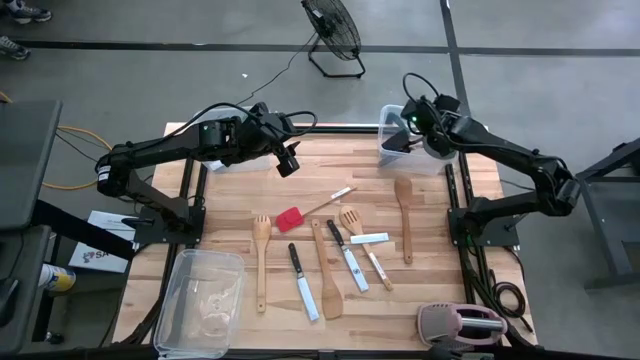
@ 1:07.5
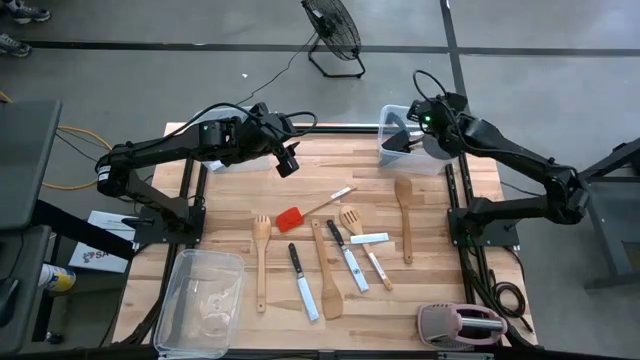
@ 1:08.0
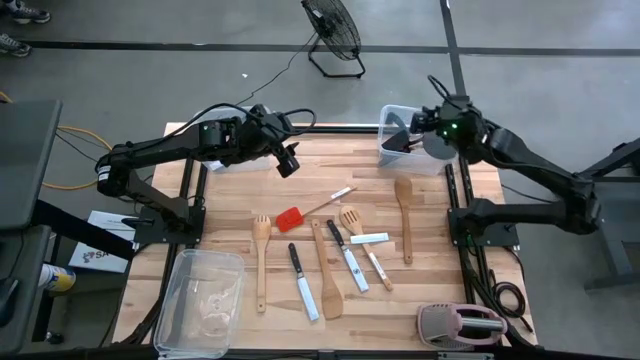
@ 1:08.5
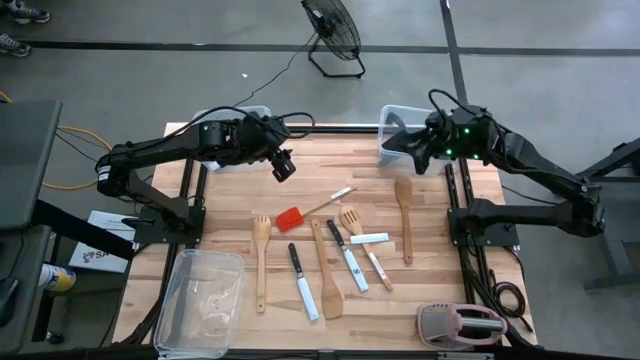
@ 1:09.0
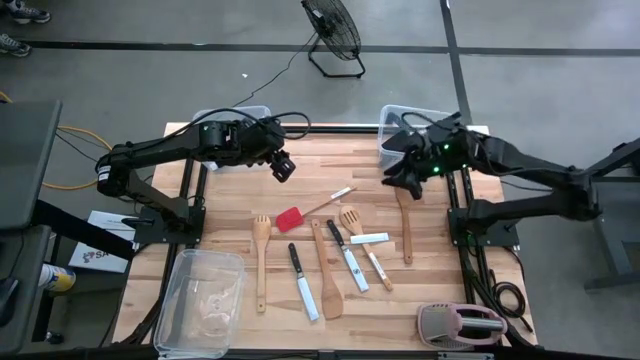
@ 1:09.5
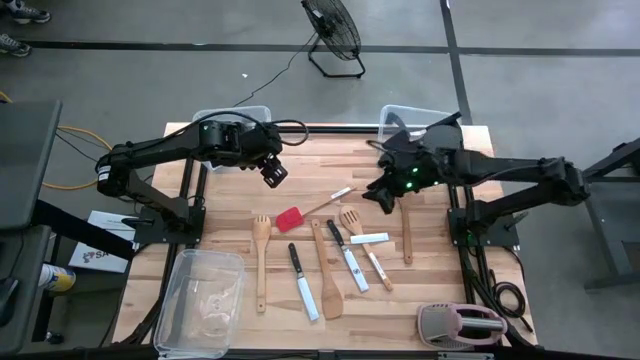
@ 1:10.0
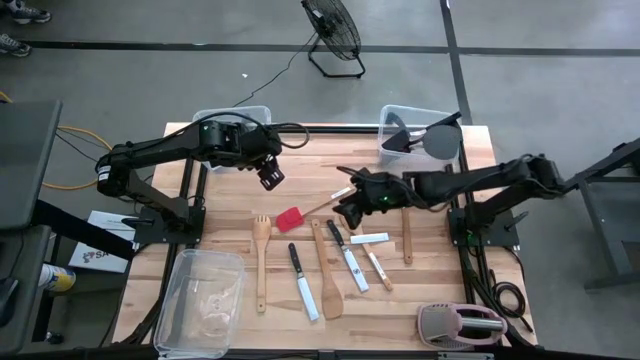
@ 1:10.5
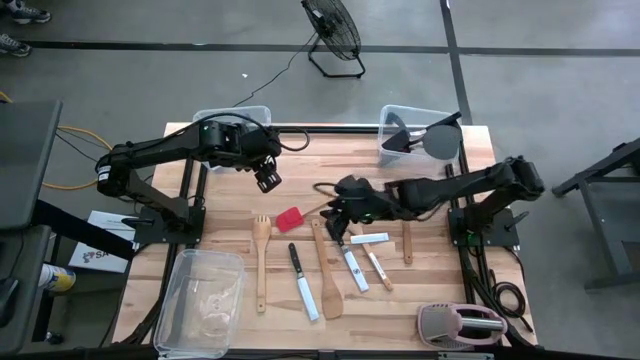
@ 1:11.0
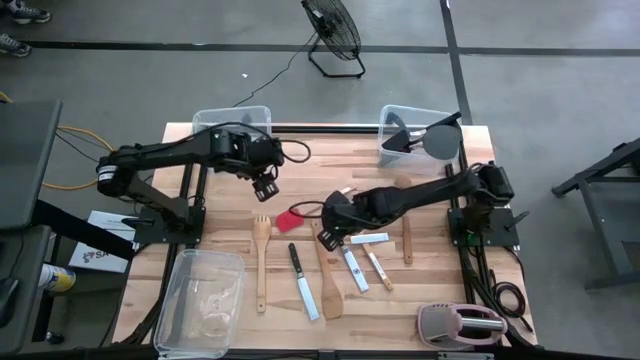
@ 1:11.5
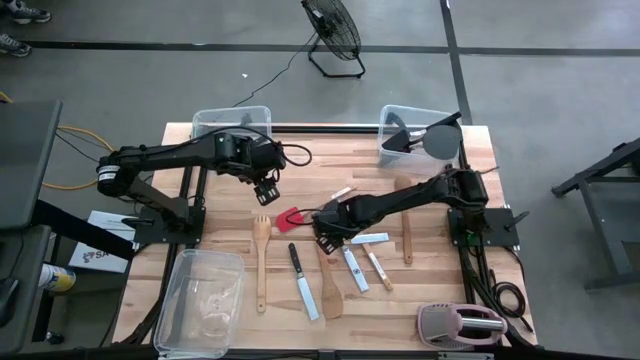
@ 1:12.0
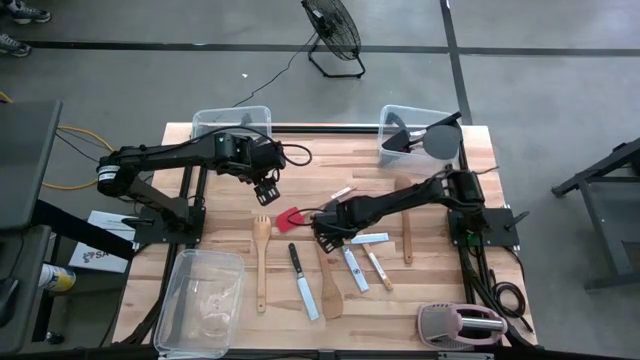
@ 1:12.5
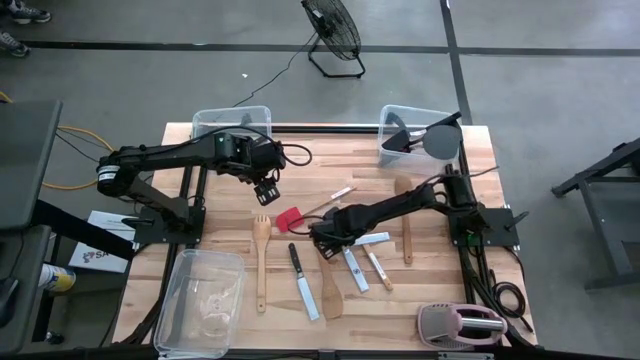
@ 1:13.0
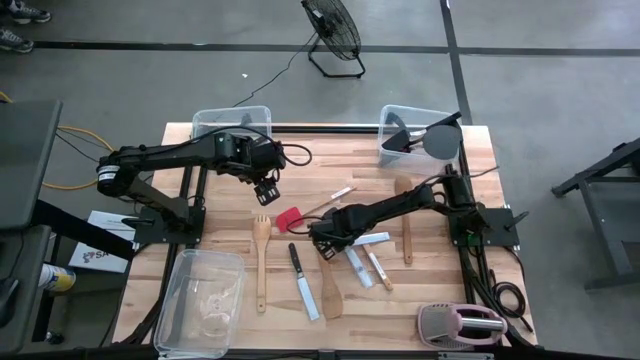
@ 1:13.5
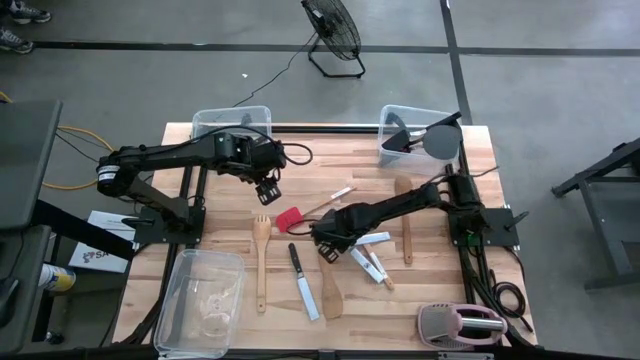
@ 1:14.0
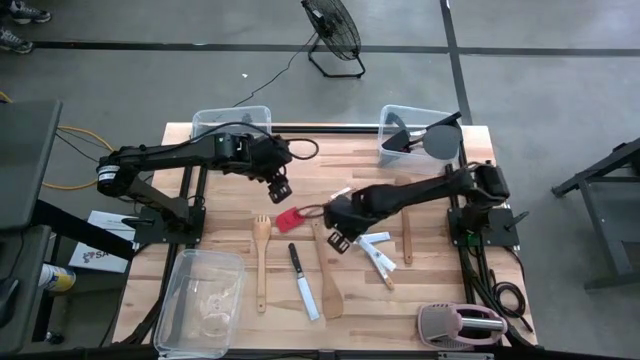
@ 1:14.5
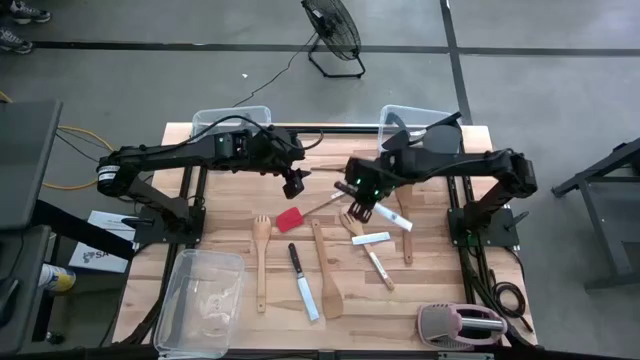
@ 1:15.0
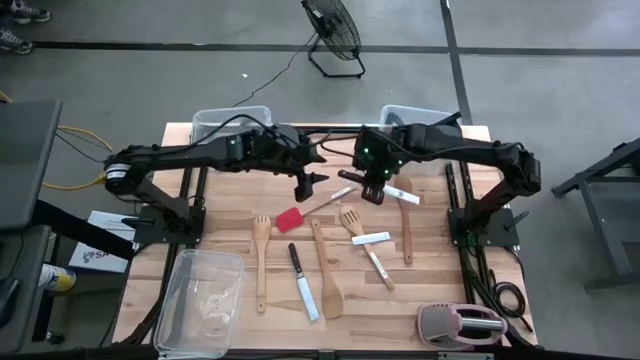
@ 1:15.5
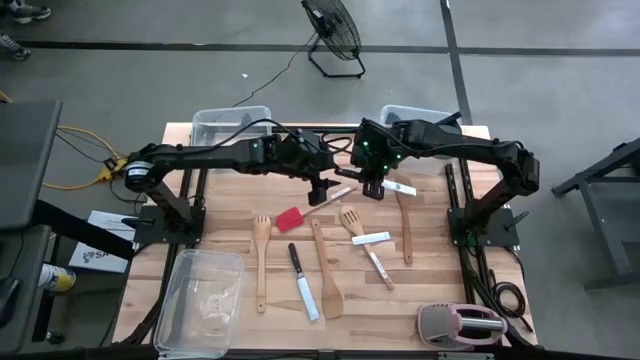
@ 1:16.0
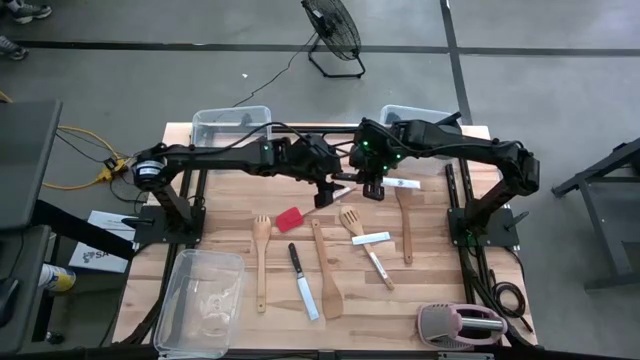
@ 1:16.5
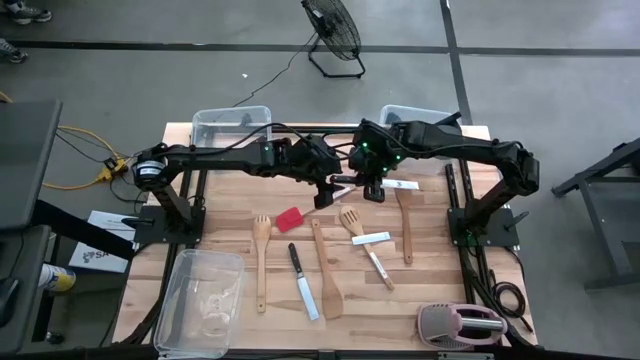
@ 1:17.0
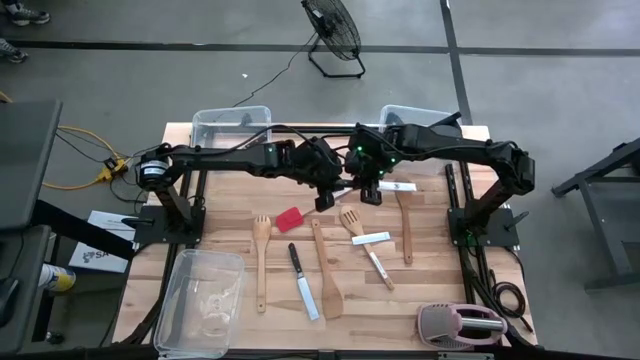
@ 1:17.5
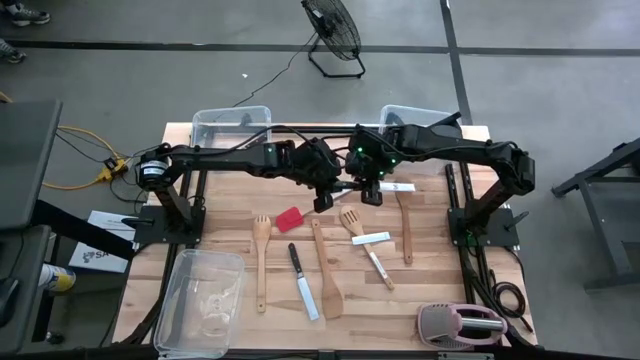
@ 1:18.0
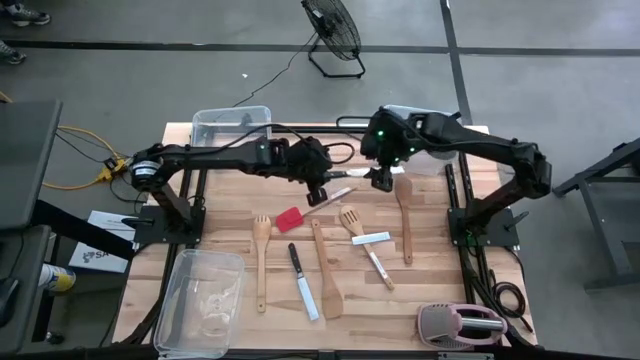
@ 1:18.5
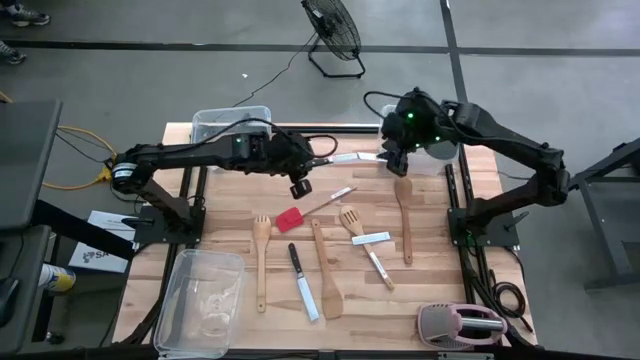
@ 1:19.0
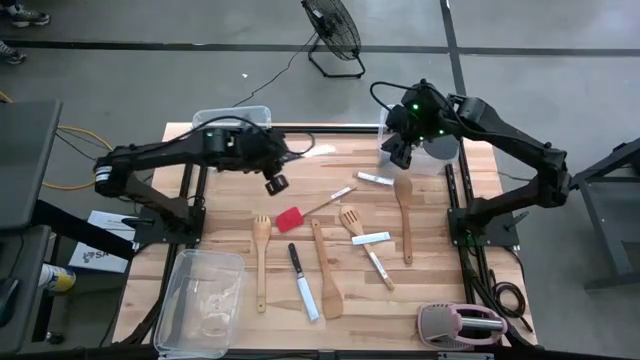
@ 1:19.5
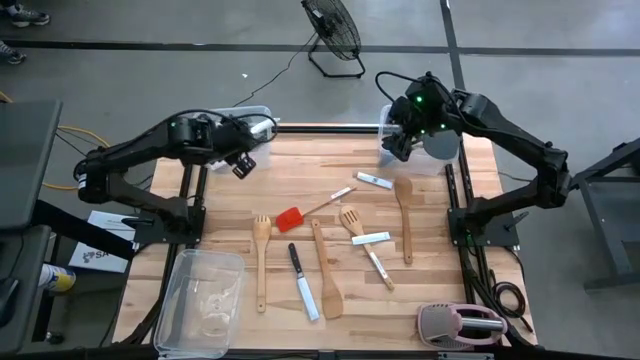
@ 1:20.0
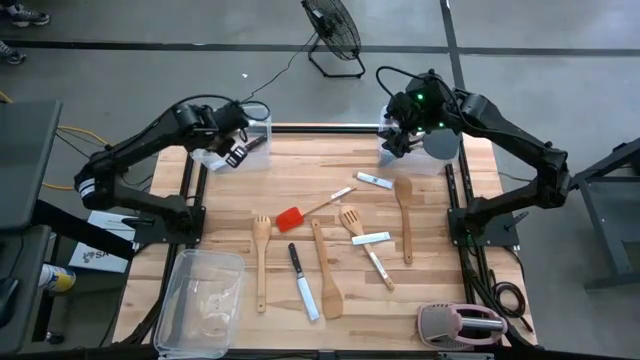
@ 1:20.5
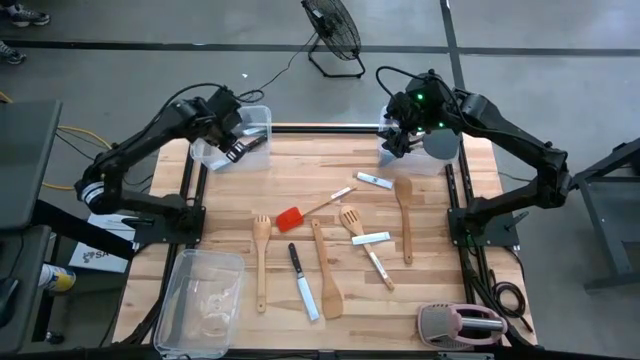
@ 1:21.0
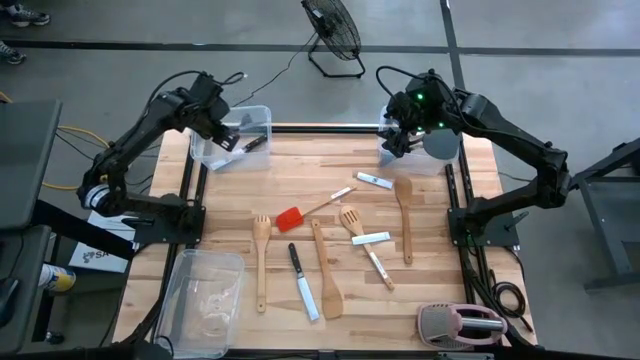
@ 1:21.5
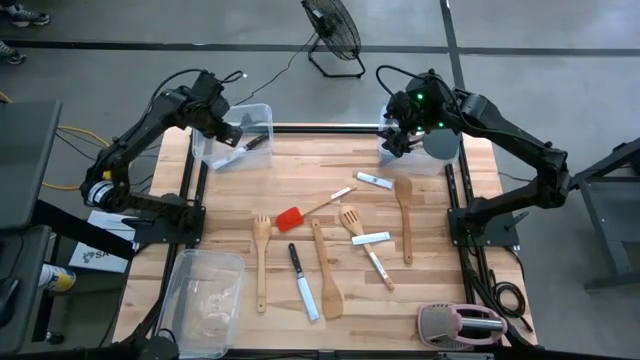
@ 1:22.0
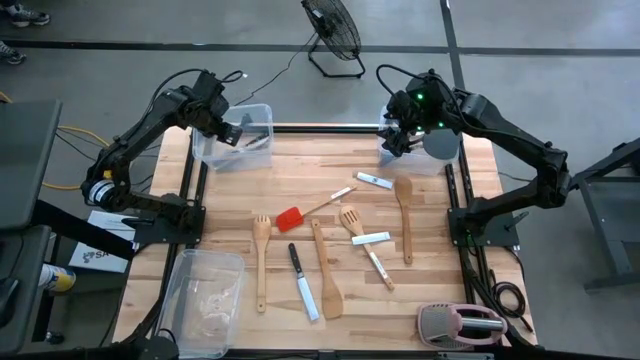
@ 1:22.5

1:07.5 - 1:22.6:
Task: Pick & Place Kitchen Items
Put the black kitchen knife into the top left transparent bin

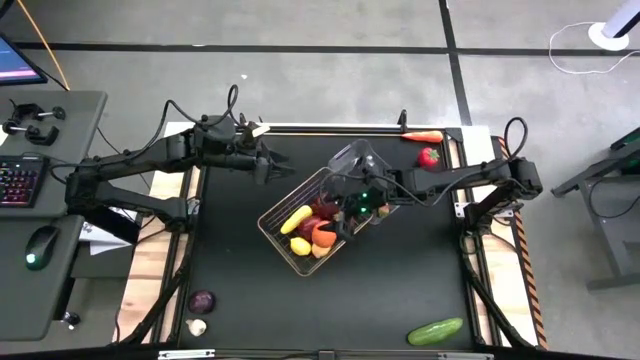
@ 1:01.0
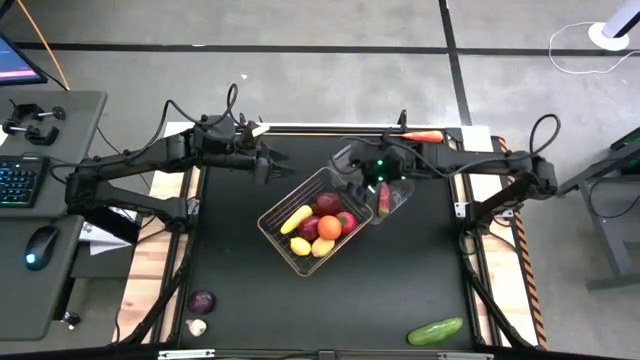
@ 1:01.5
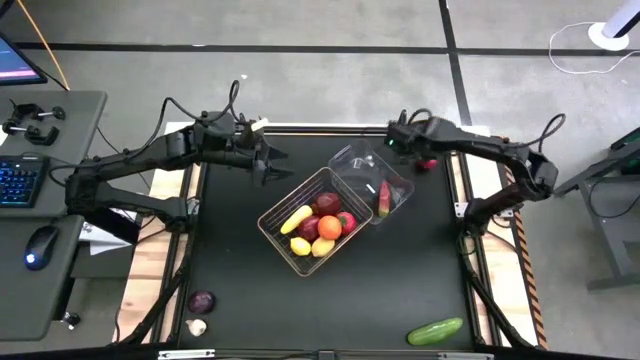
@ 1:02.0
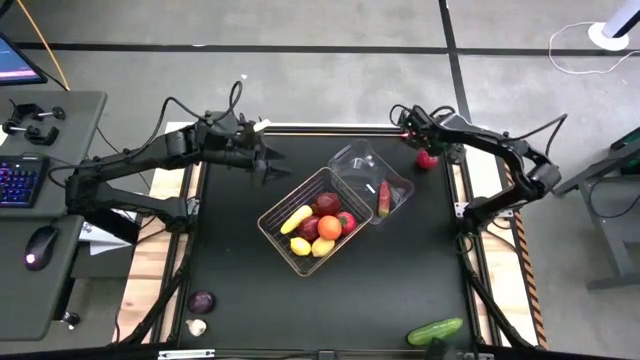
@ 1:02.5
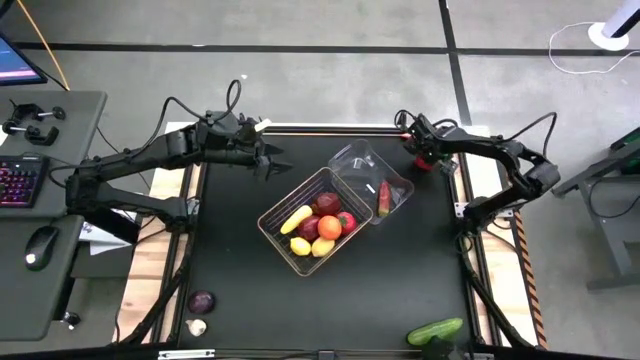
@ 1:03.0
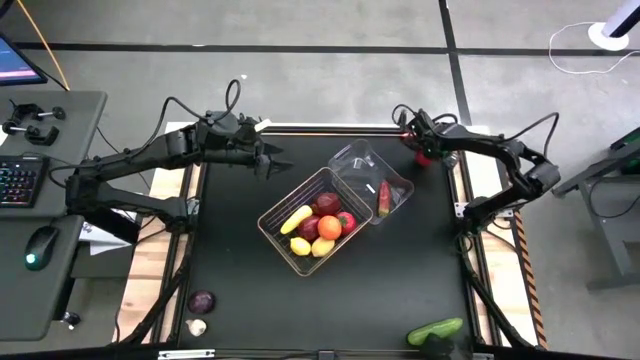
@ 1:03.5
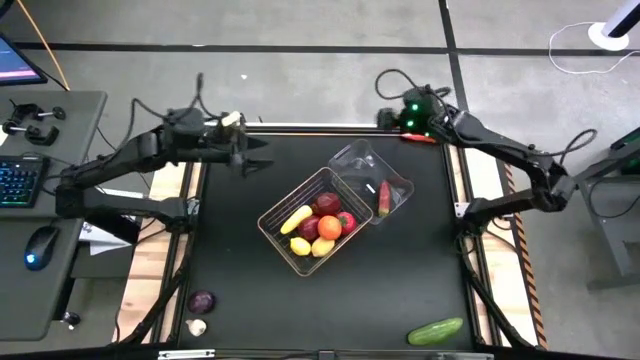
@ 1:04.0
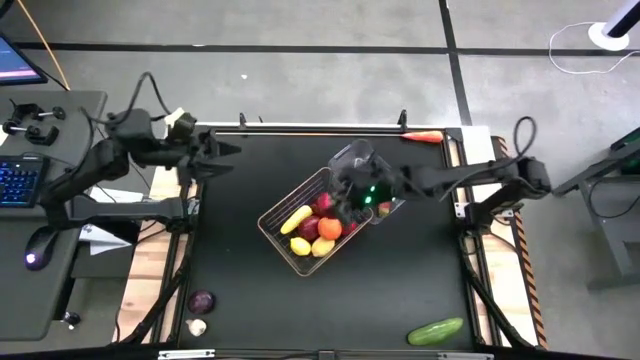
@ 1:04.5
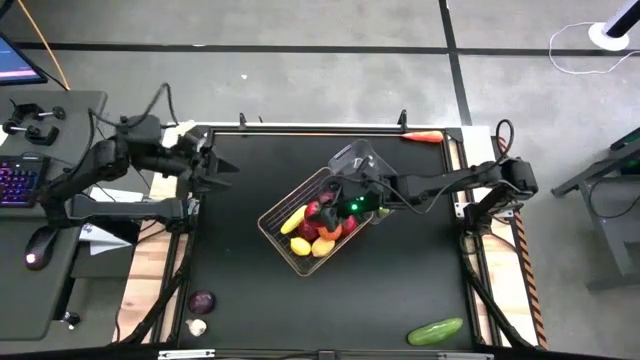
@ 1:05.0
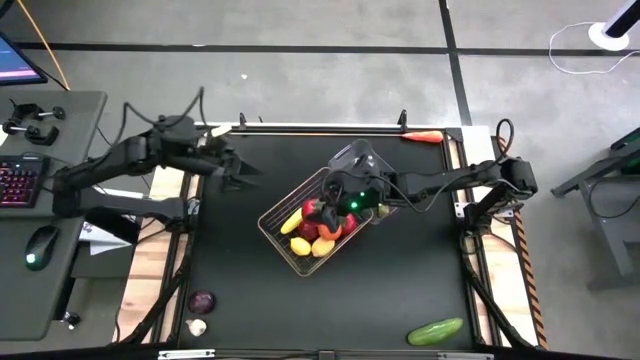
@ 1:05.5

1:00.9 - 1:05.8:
Task: Sort produce into baskets
Put the tomato into the gold wire basket

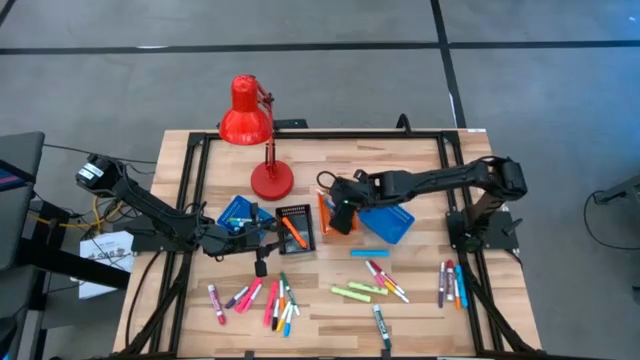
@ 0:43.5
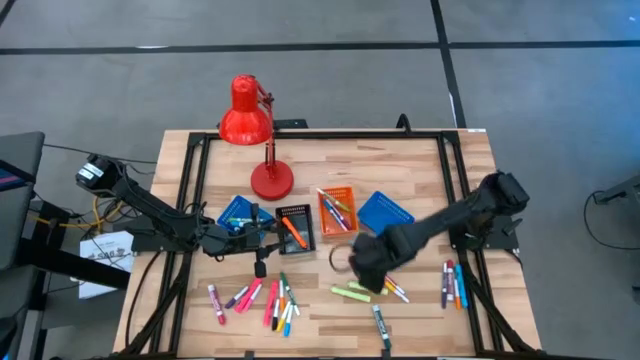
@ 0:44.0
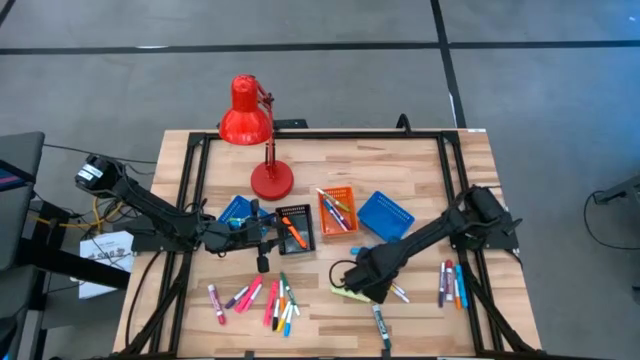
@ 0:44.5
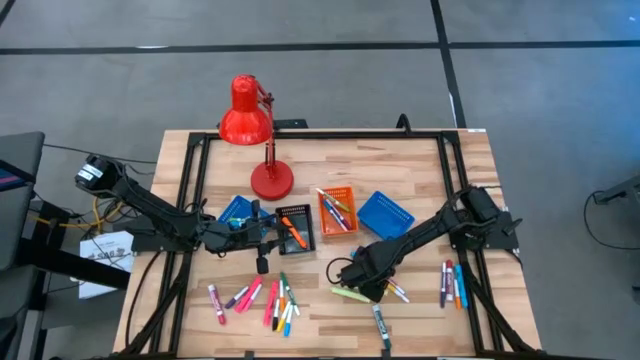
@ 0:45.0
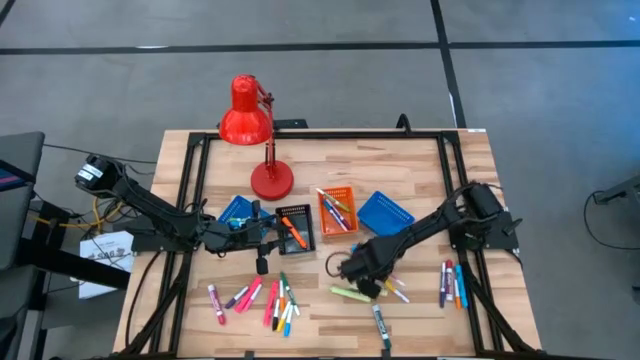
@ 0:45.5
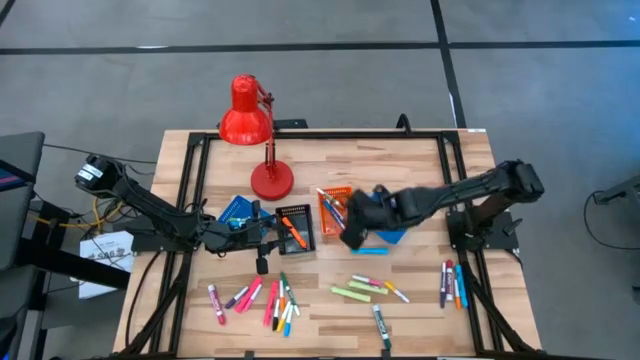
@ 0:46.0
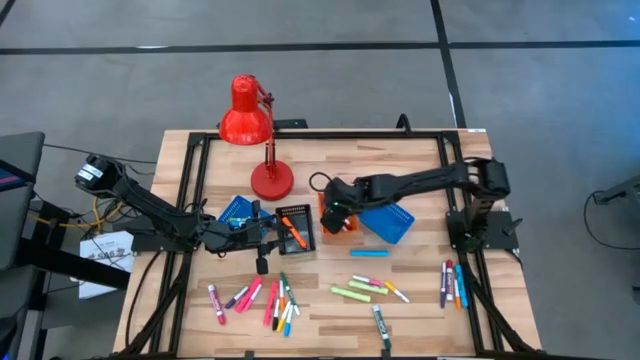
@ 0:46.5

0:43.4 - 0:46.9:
Task: Pick & Place Markers
Put the small red marker pen into the orange basket
